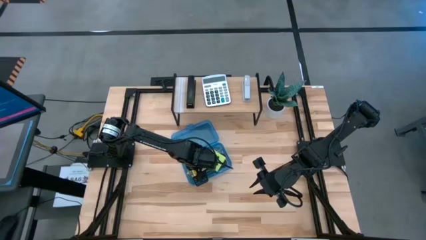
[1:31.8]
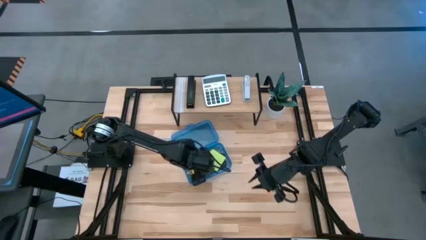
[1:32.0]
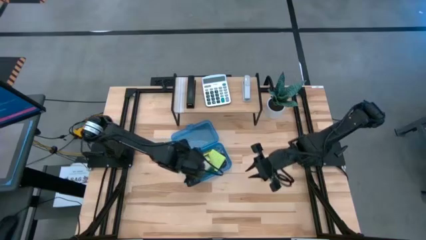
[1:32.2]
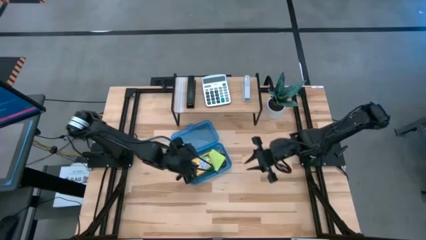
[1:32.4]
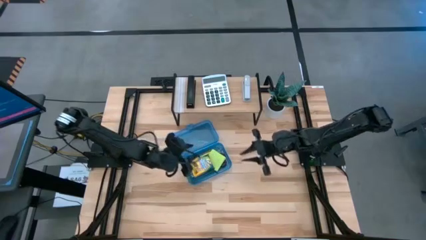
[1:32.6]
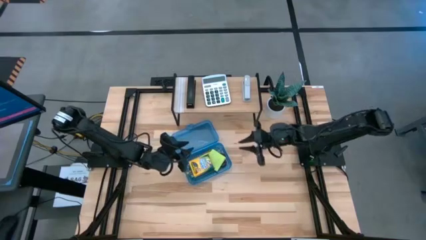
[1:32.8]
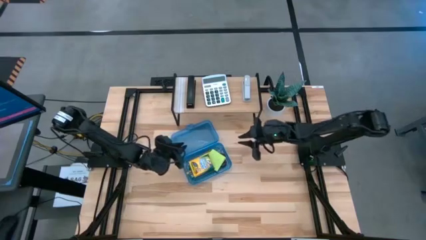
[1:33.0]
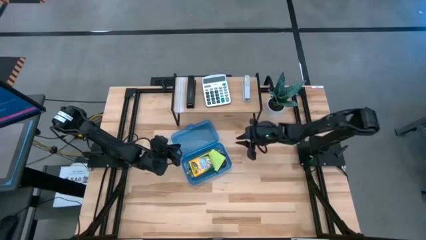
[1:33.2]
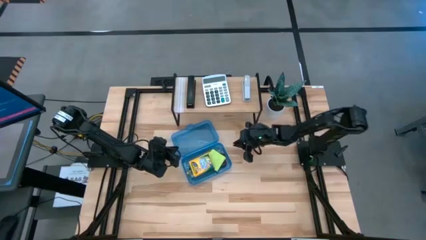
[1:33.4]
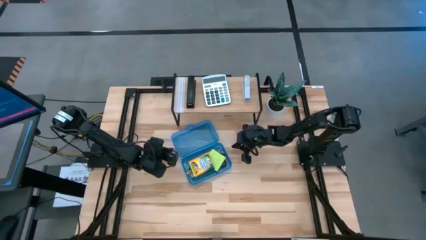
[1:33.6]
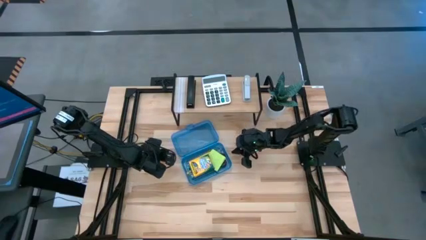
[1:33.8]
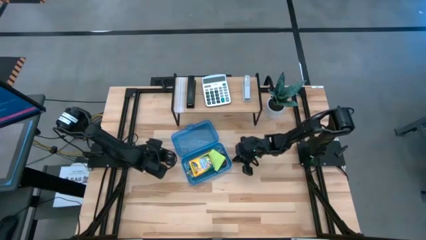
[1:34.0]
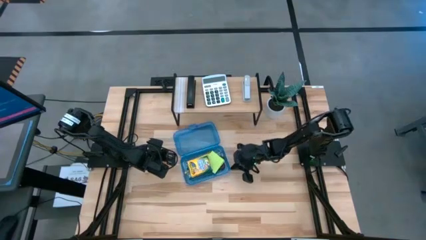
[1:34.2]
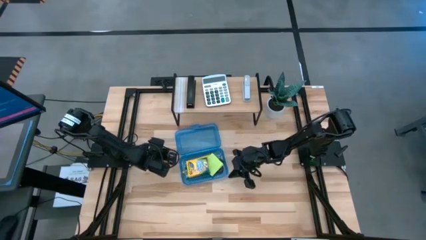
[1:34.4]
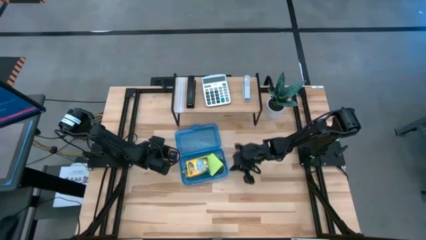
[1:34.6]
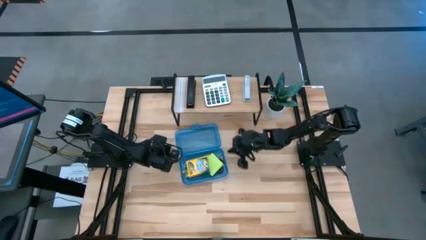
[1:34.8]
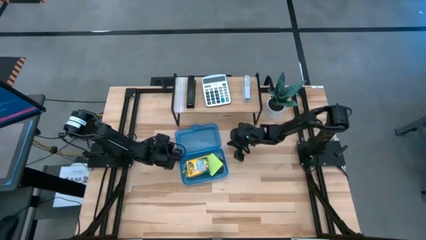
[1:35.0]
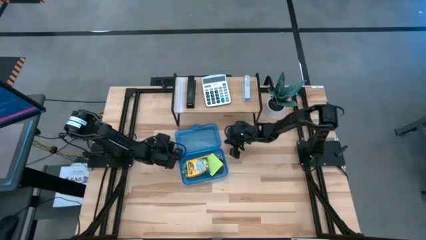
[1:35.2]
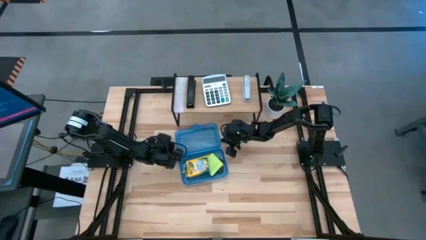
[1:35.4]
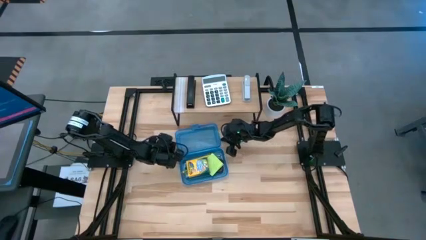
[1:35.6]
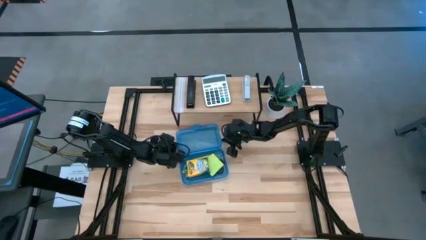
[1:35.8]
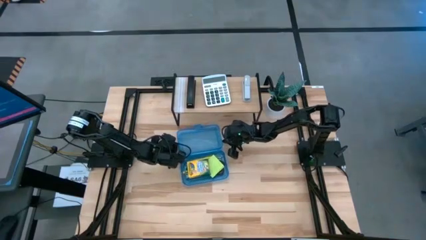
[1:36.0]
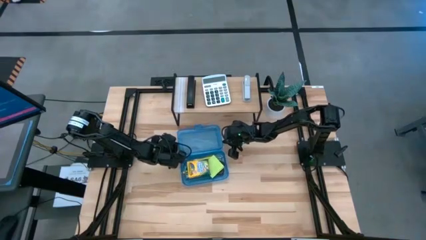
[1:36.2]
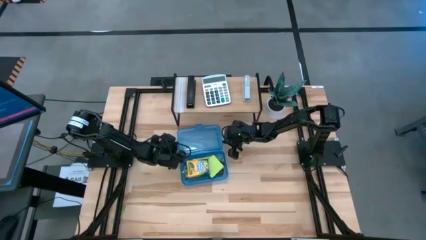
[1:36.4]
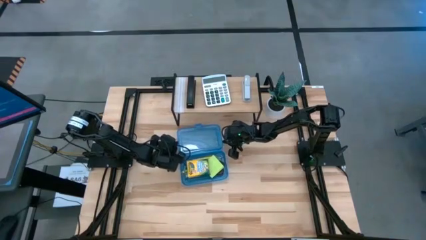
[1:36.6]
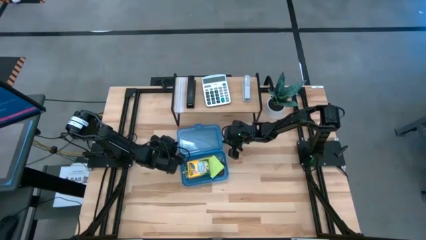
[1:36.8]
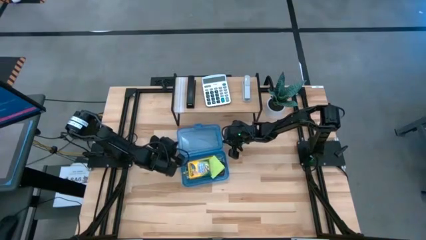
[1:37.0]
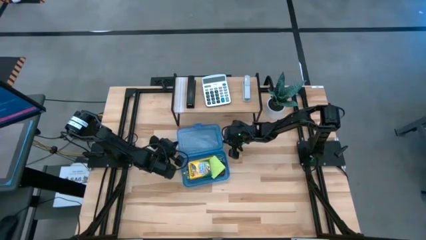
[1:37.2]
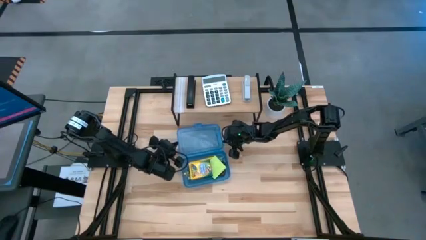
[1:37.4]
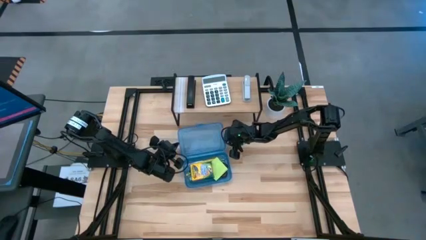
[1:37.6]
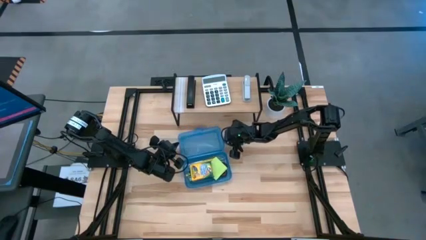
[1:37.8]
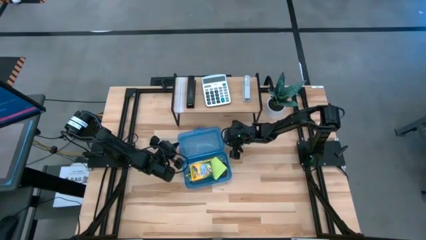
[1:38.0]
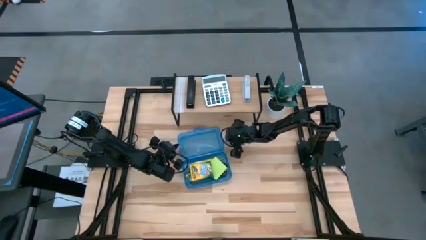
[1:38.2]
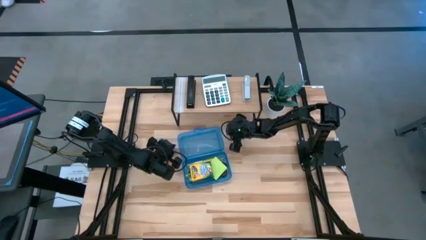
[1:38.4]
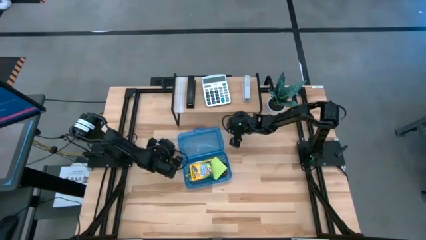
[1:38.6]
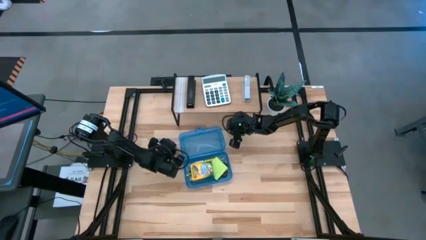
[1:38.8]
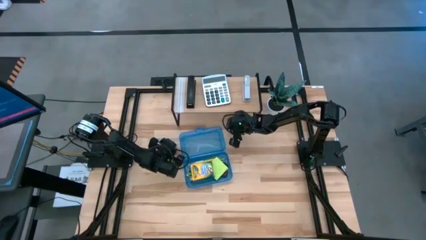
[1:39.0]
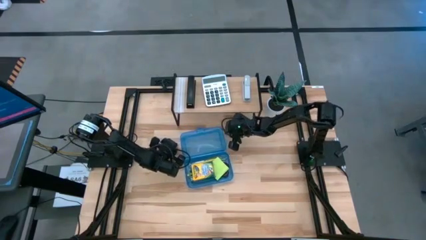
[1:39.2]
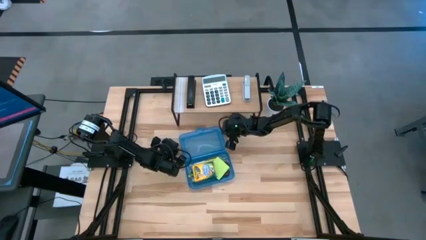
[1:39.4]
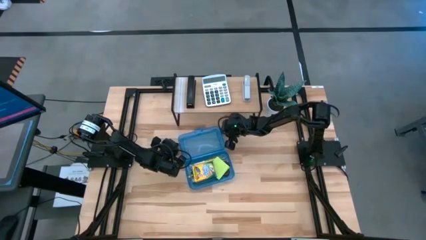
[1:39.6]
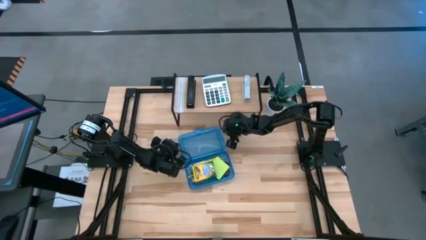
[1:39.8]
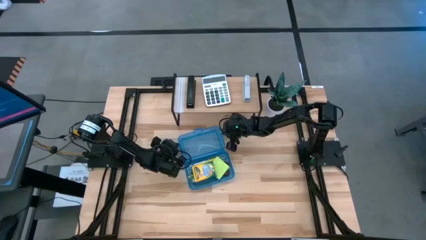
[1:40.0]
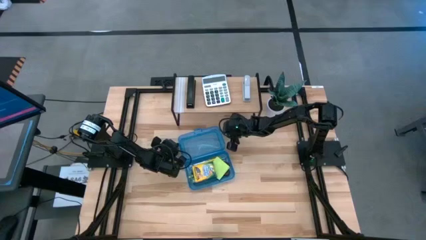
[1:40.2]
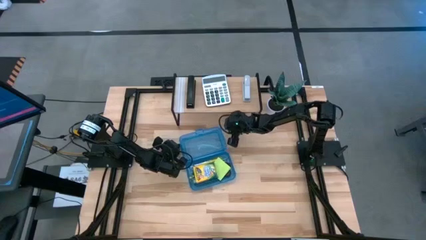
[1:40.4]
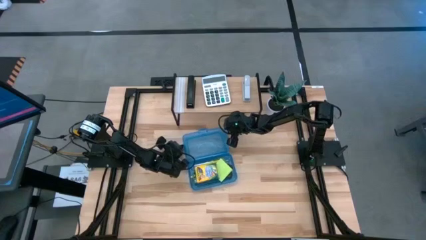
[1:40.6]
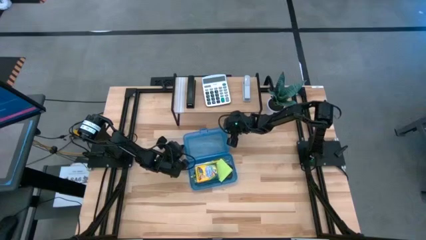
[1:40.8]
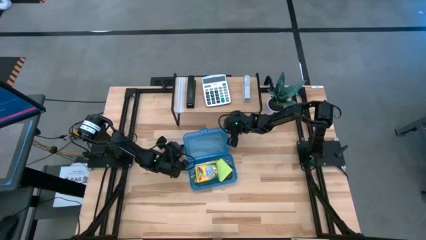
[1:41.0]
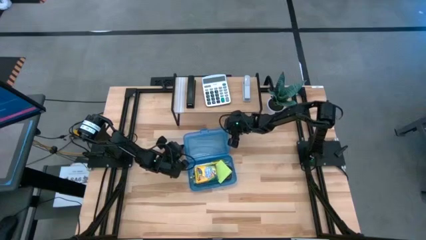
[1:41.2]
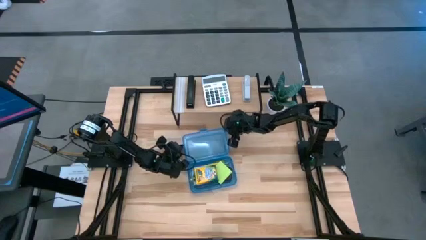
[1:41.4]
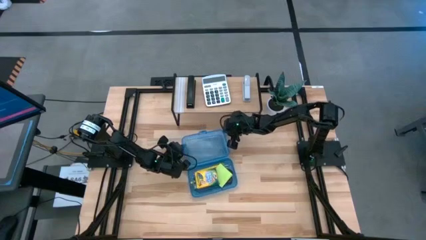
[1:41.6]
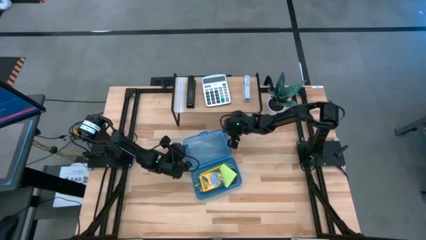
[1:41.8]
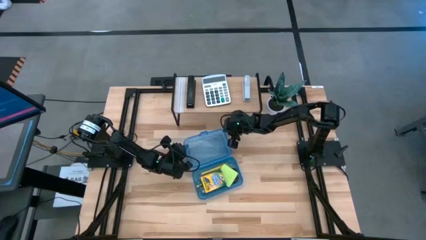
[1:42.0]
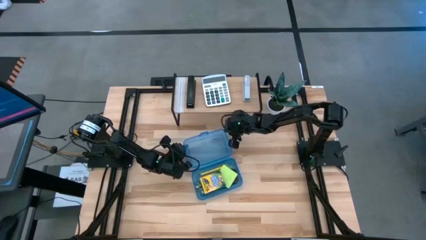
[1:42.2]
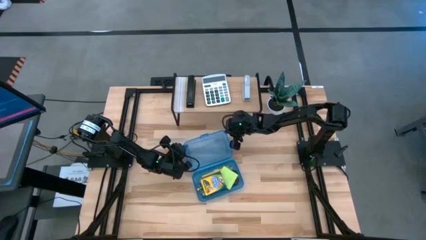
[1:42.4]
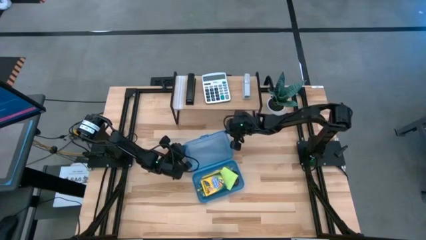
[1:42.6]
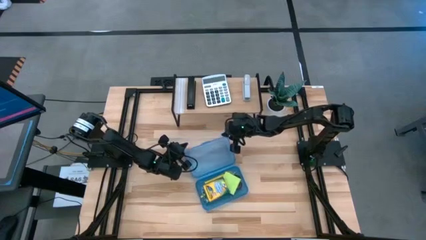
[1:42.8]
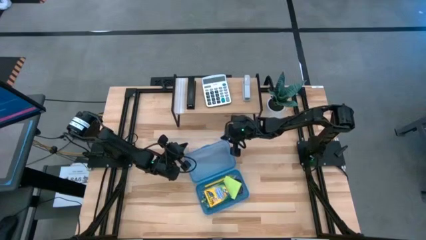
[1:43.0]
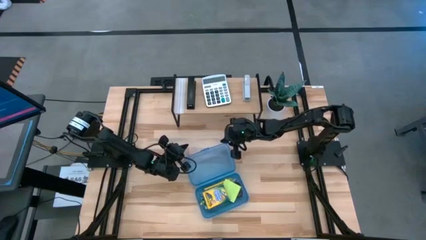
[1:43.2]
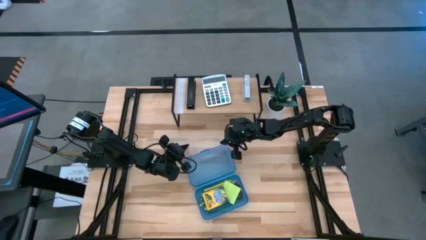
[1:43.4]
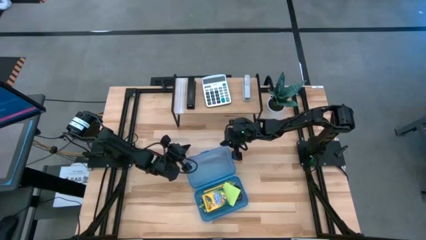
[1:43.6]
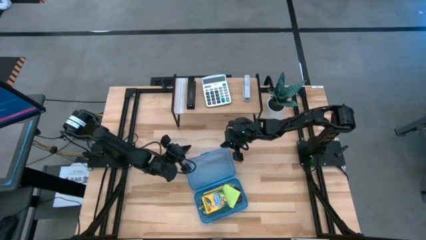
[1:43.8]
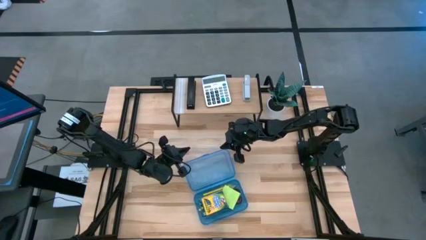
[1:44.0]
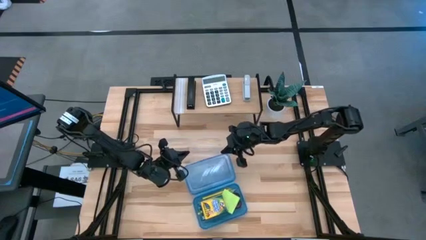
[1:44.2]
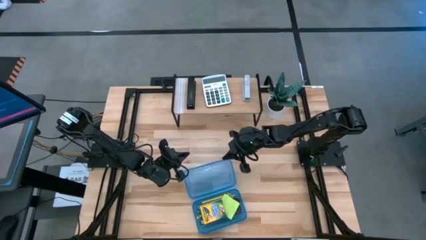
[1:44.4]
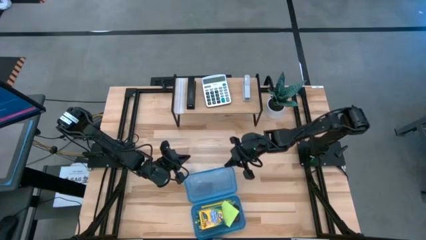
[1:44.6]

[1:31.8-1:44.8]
Task: Pack school essentials
Close the blue supply box

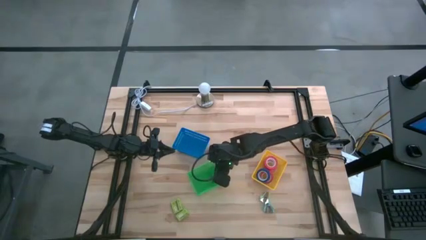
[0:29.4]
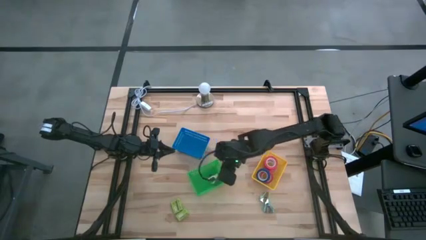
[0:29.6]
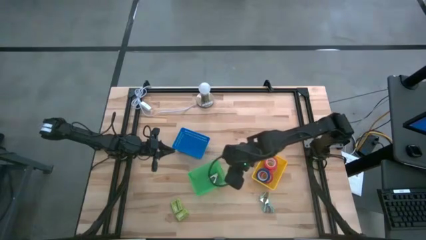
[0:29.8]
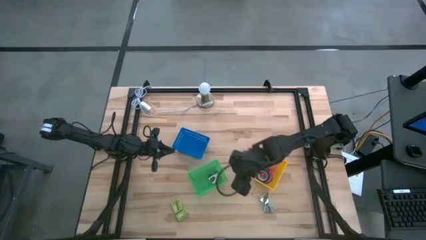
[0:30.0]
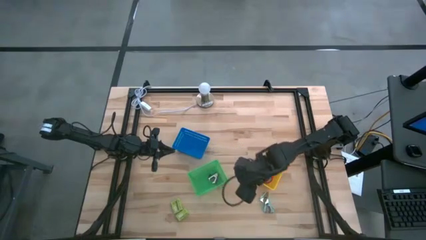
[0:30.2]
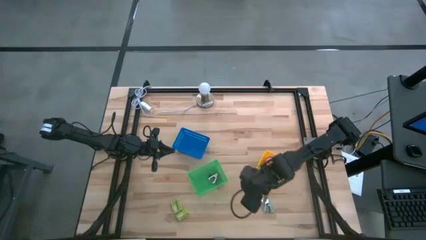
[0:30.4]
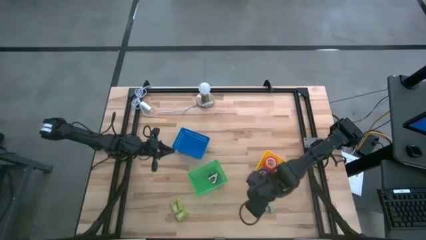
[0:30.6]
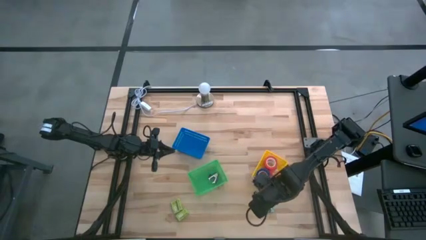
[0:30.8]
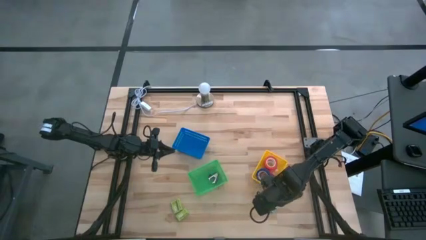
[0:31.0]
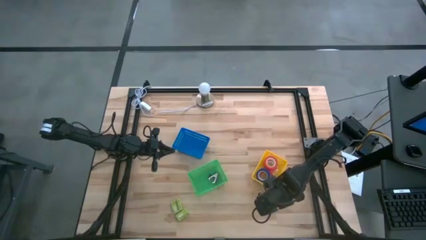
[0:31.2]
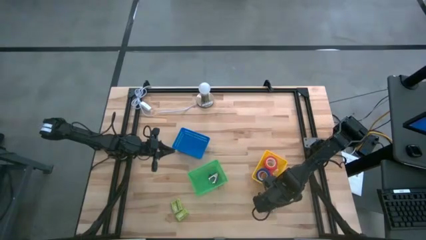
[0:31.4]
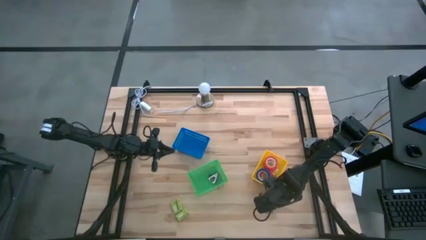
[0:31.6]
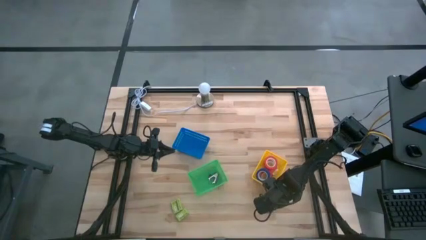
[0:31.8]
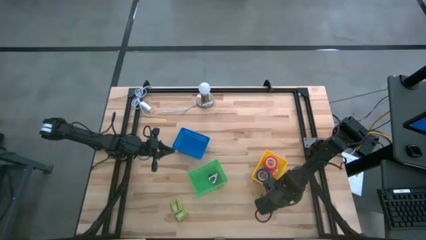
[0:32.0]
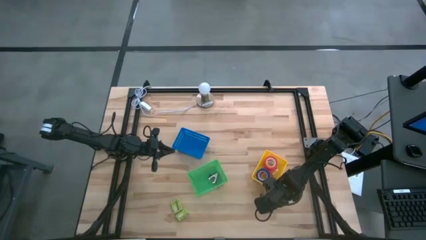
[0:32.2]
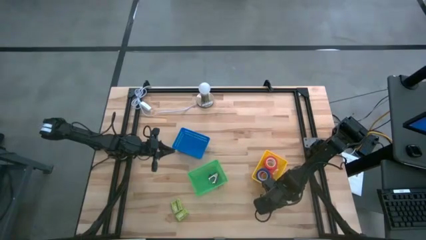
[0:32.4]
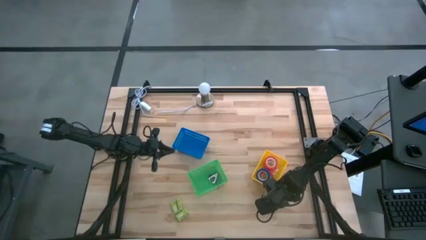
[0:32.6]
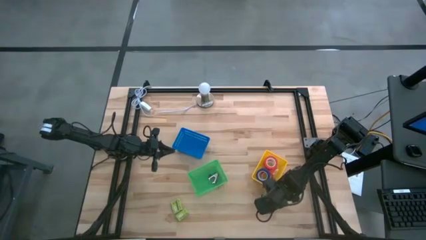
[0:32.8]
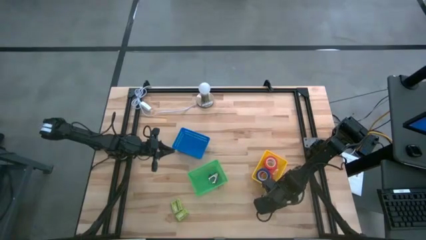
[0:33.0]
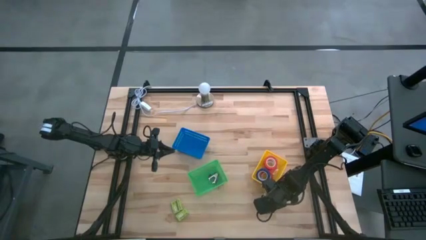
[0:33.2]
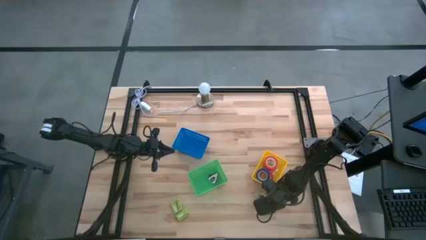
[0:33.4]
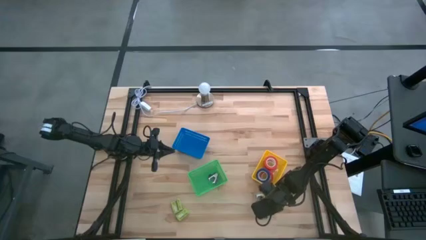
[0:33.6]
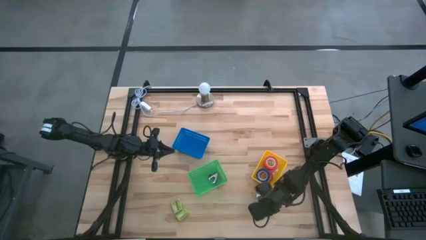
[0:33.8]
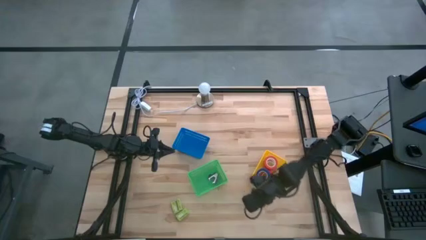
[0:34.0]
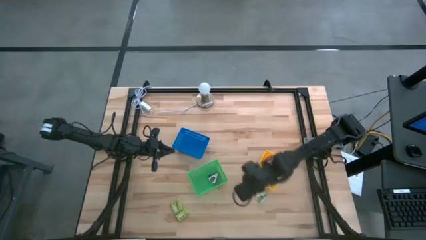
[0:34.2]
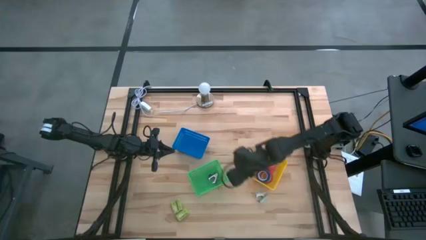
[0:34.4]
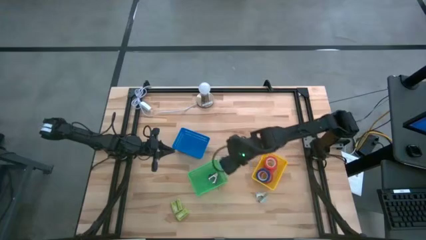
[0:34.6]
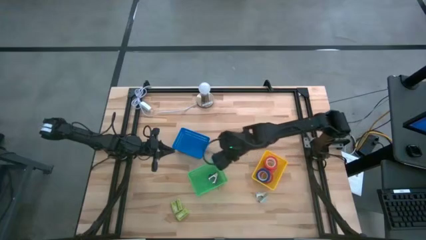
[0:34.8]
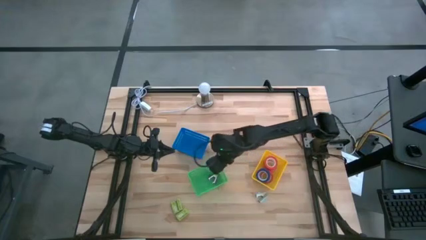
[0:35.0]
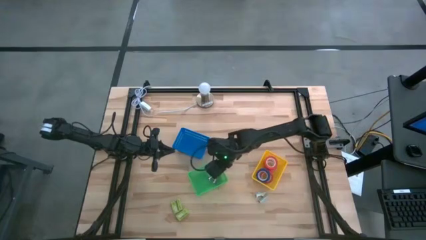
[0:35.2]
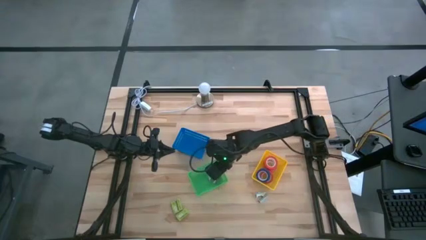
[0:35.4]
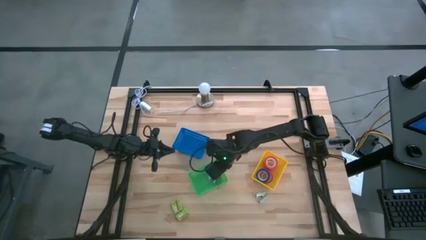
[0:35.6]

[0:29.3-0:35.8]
Task: Pick and place Stapler, Stapler remover, tape
Put the bottom blue staple remover into the green bin
